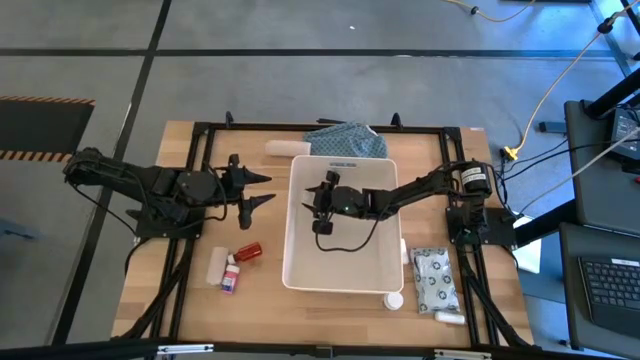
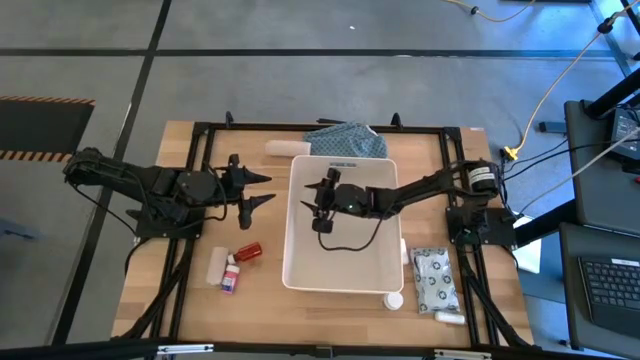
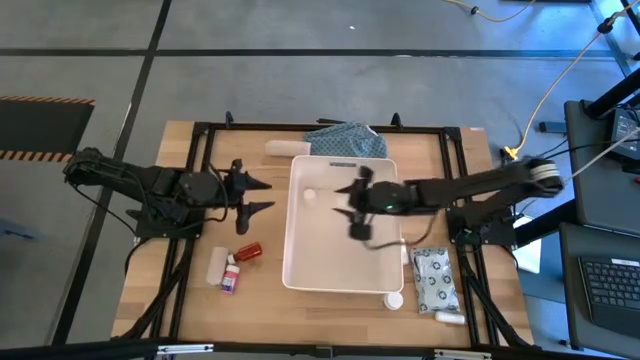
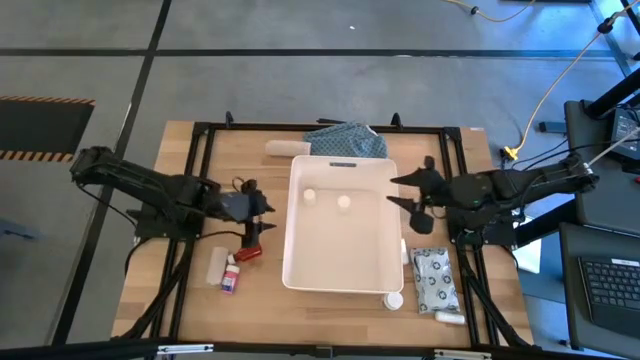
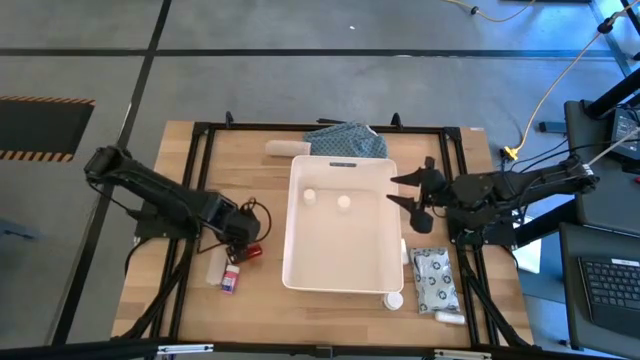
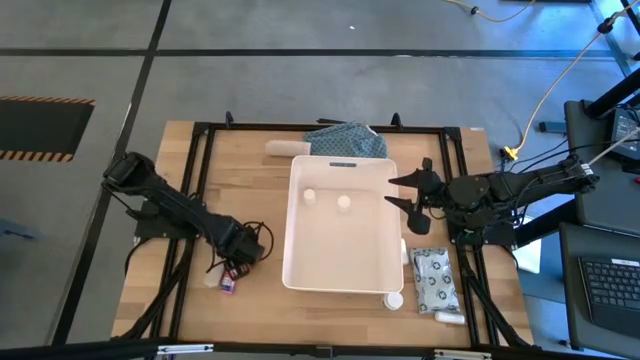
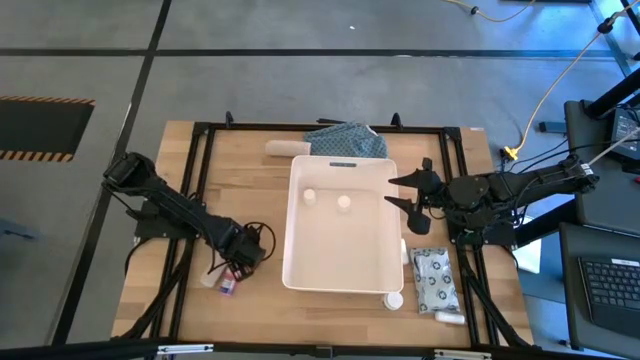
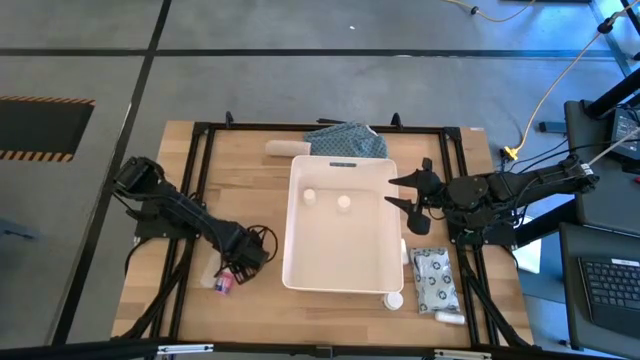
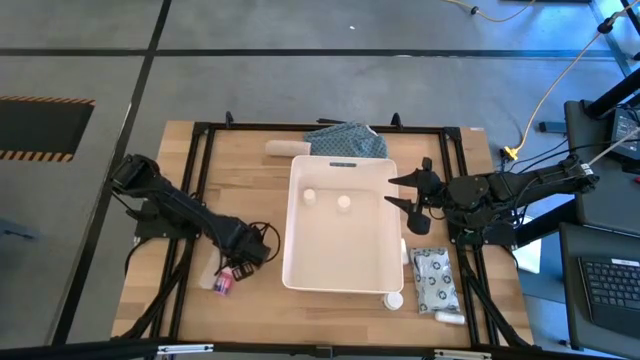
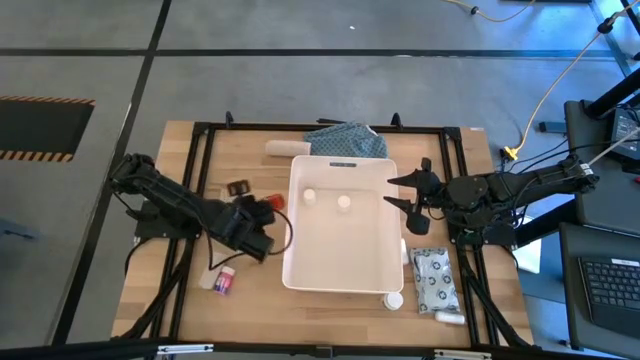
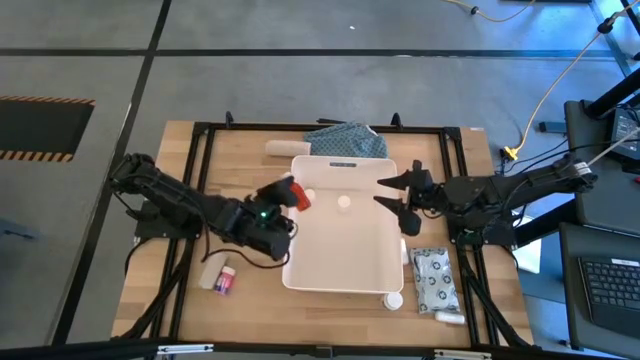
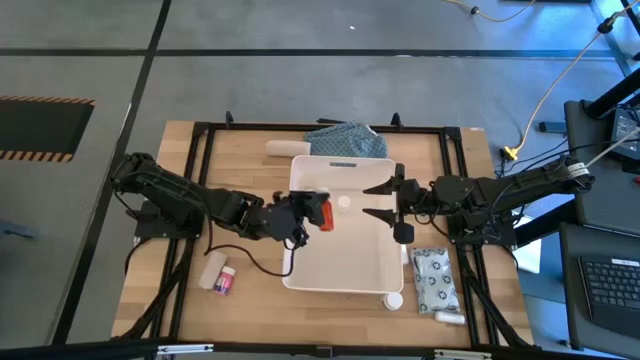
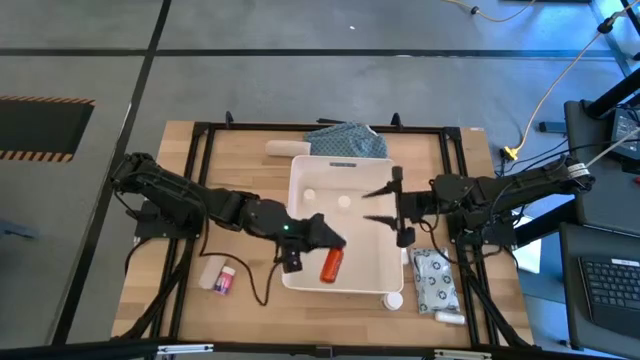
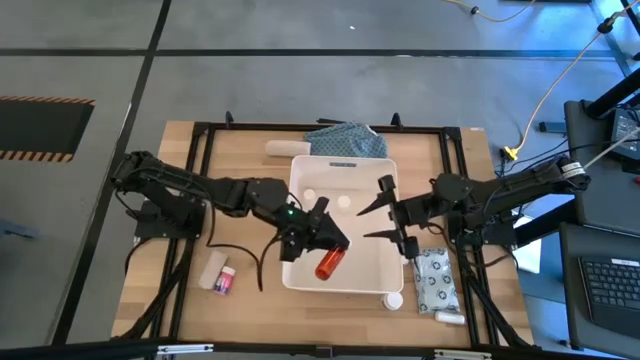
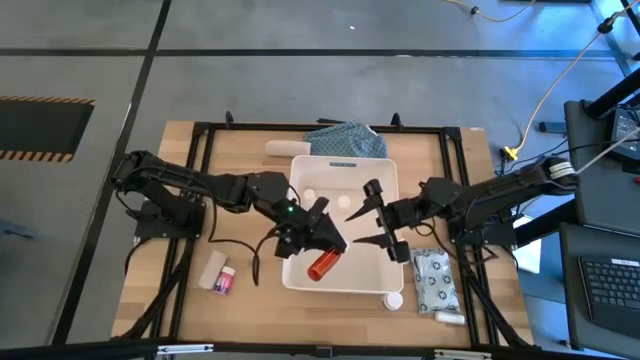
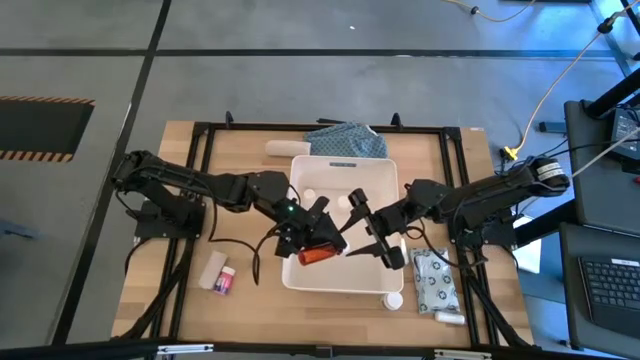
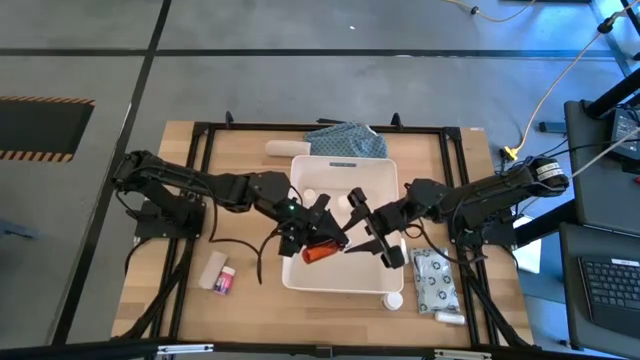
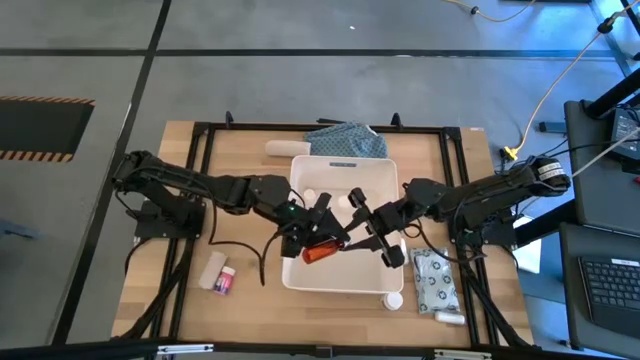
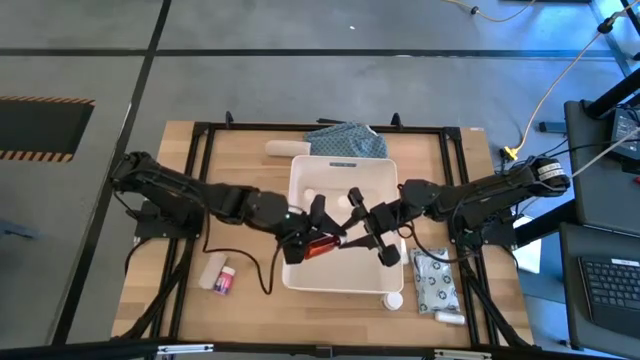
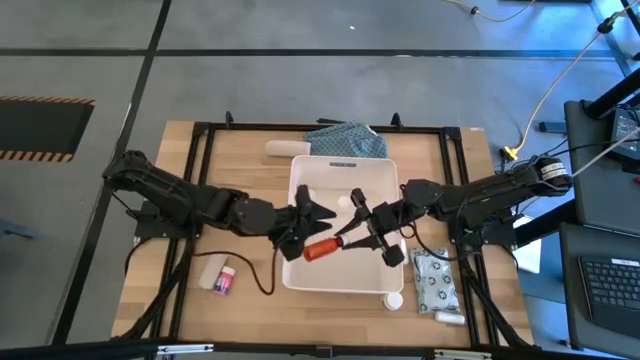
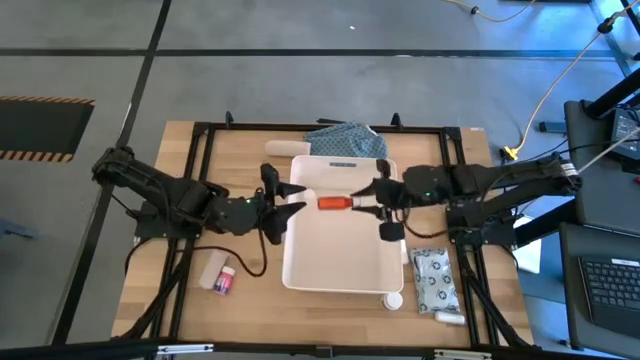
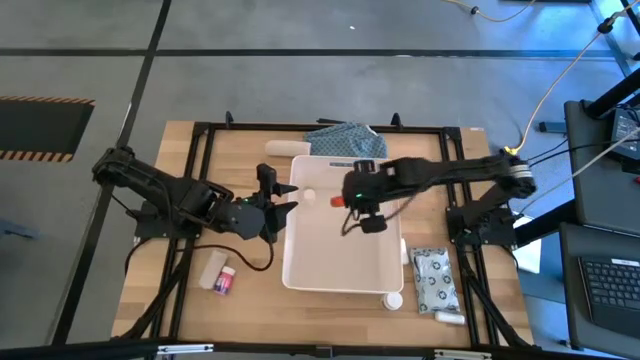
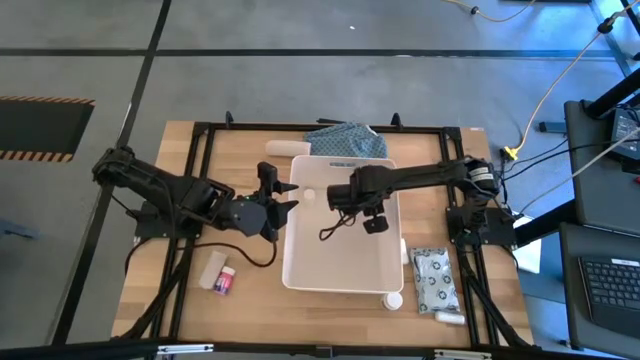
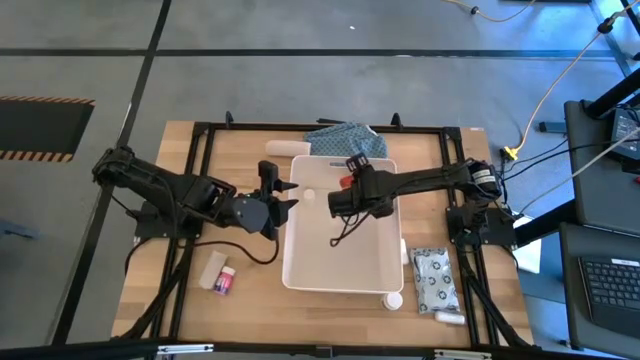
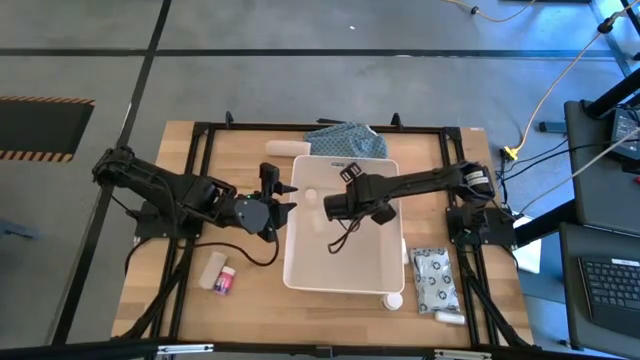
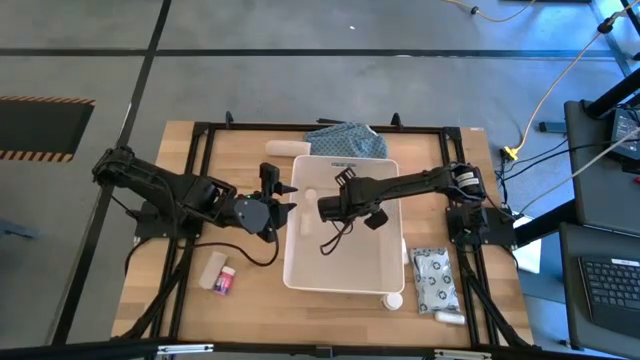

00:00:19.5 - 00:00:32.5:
Task: Pick & place medical supplies in basket/bin
Put the red pill bottle into the white bin

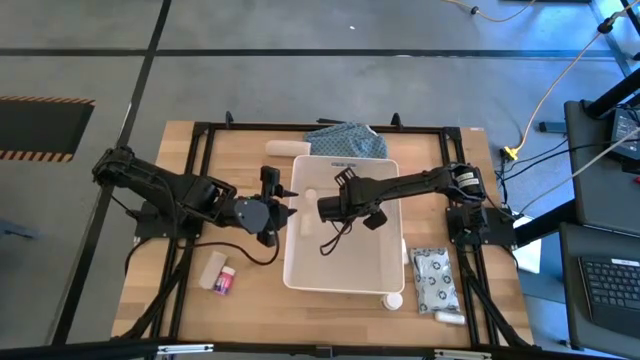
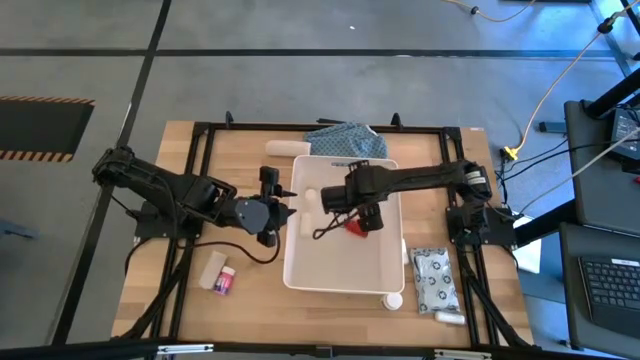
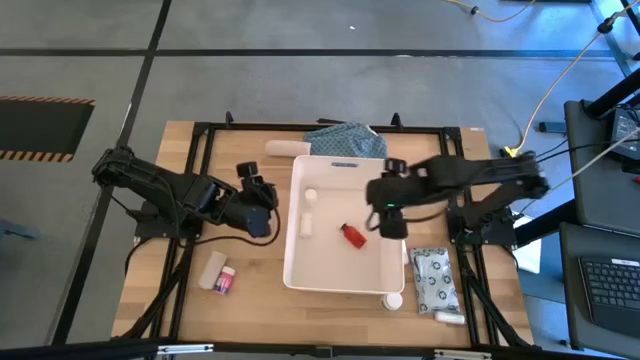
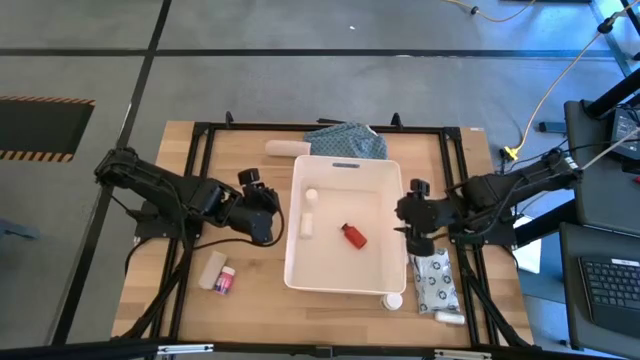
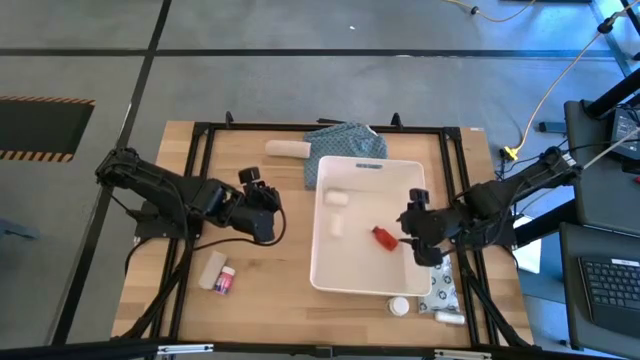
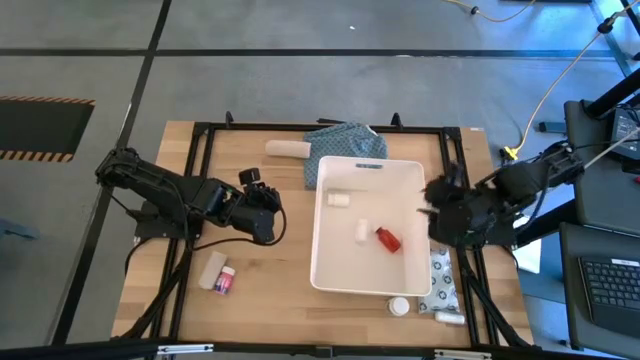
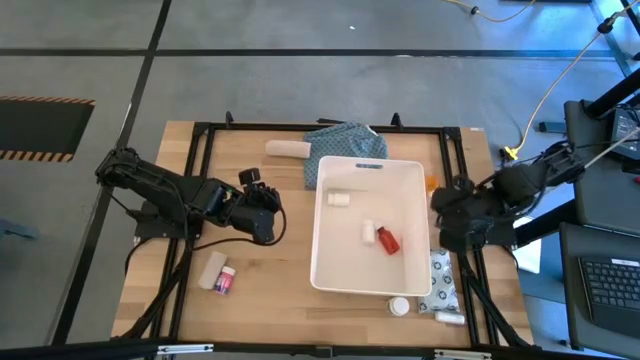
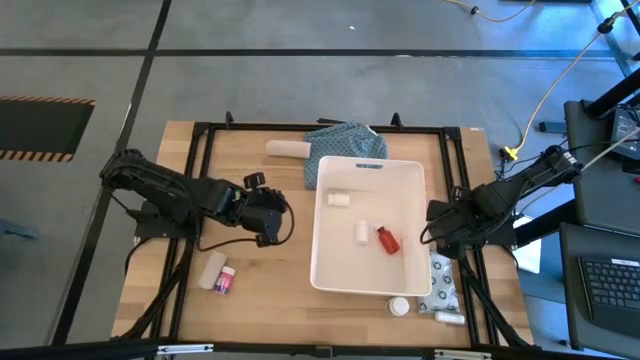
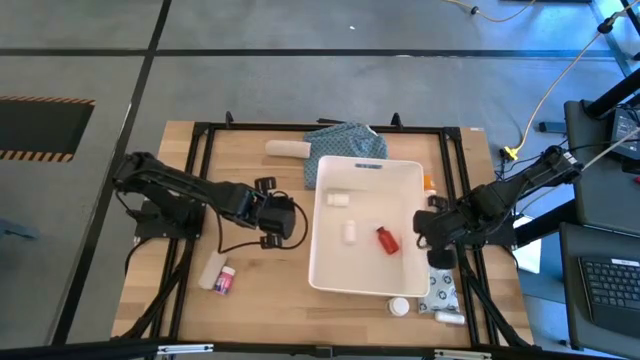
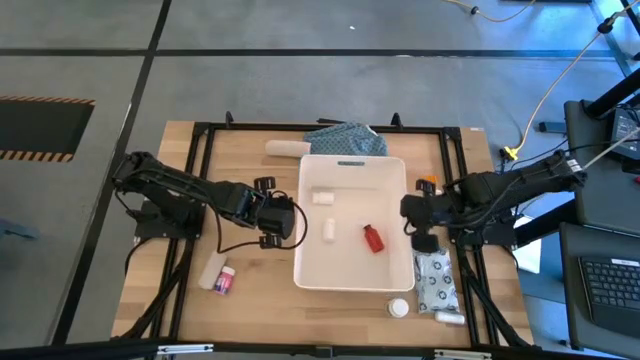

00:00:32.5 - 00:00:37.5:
Adjust the white bin

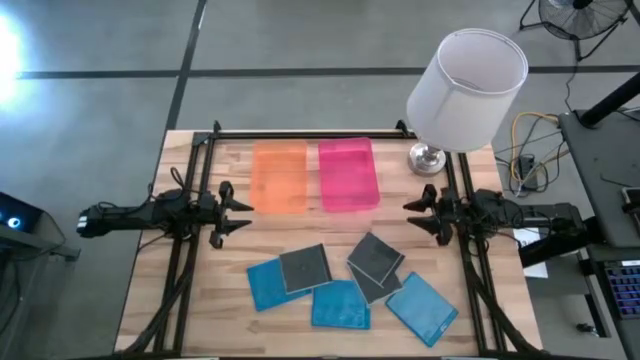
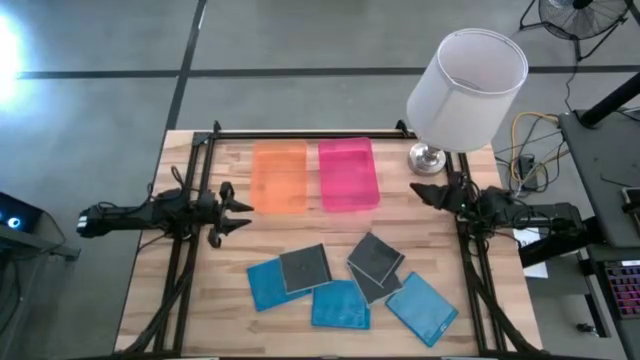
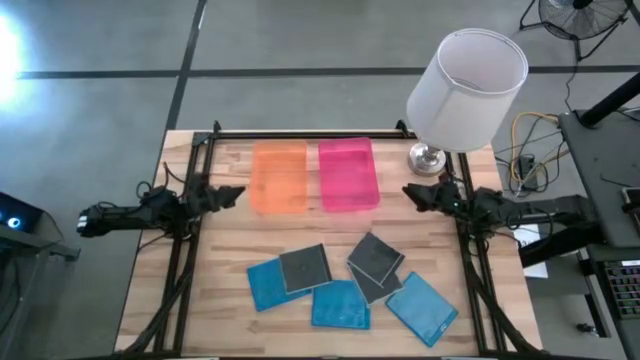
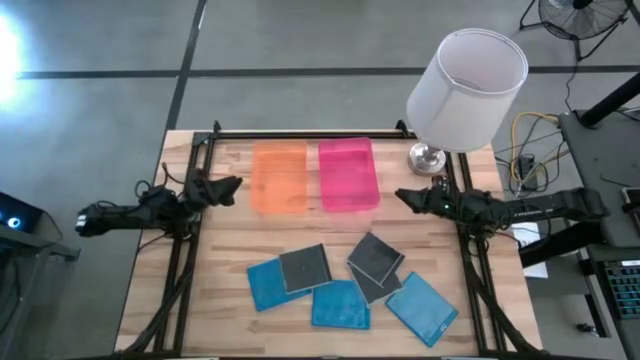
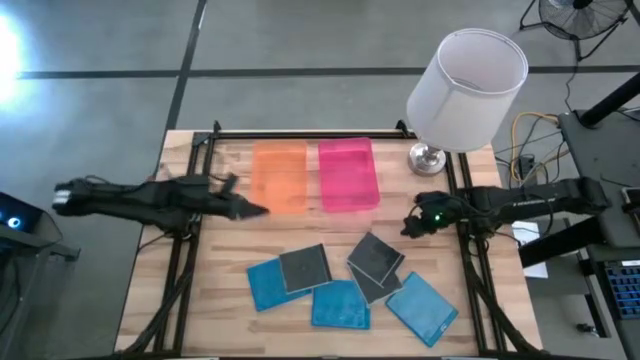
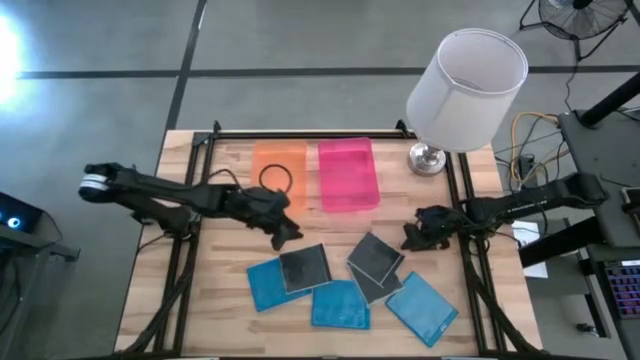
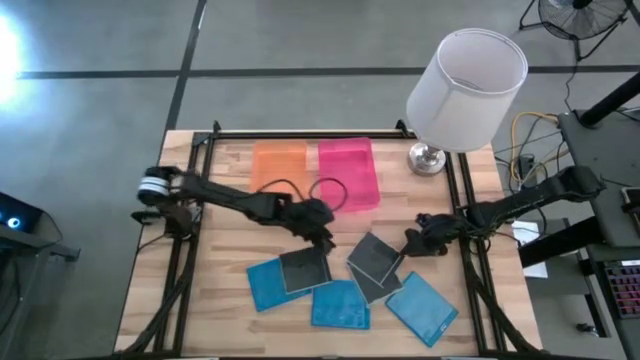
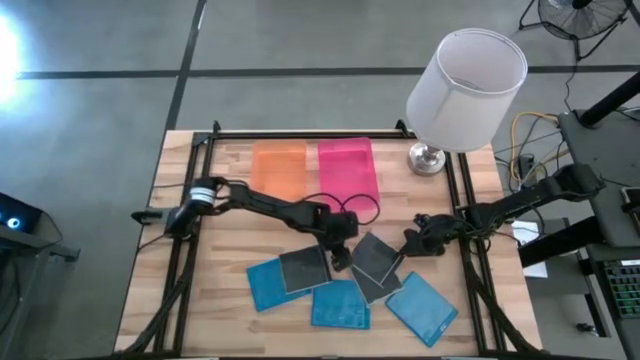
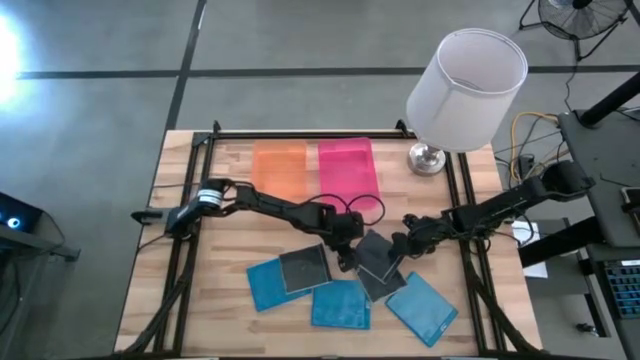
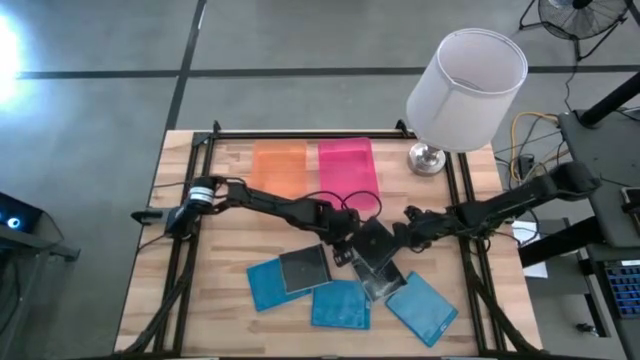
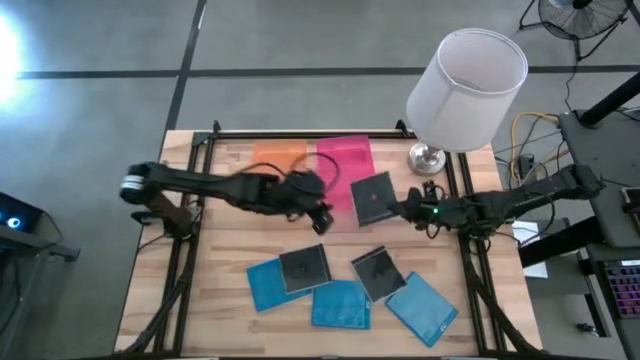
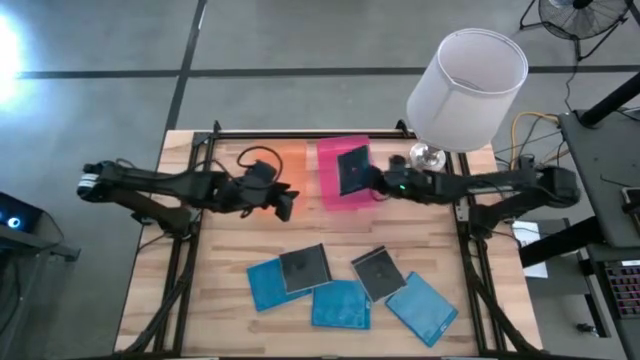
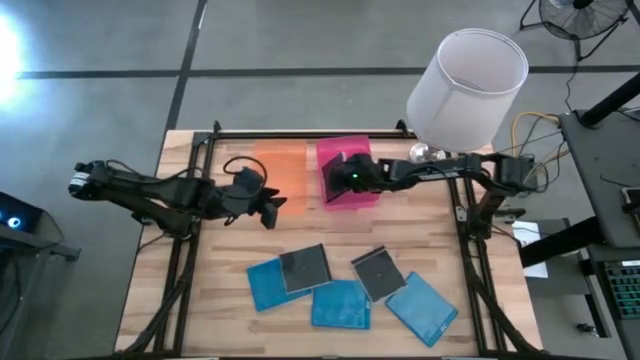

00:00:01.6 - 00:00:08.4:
Task: Pick & place jewel cases by type
Put the top black CD case into the pink bin
